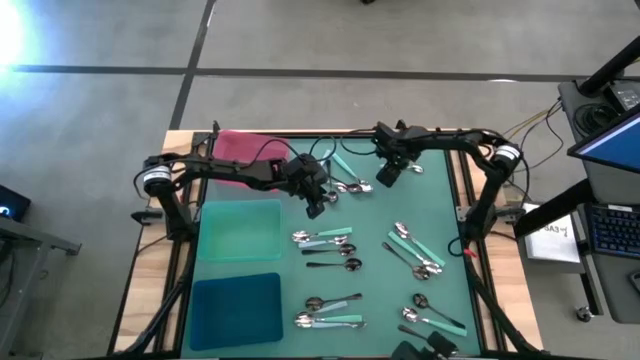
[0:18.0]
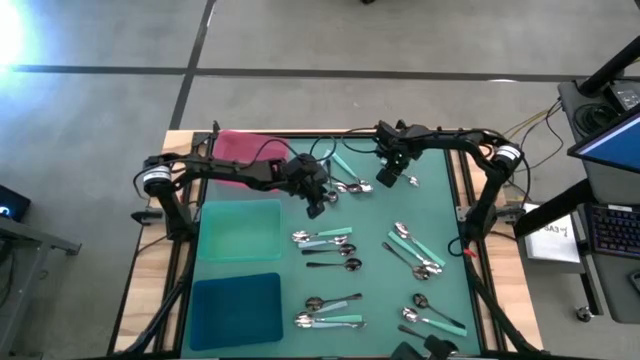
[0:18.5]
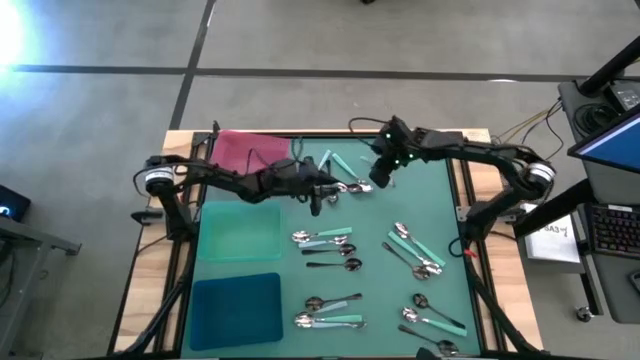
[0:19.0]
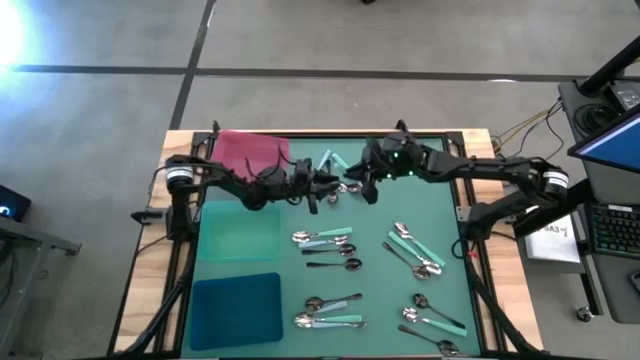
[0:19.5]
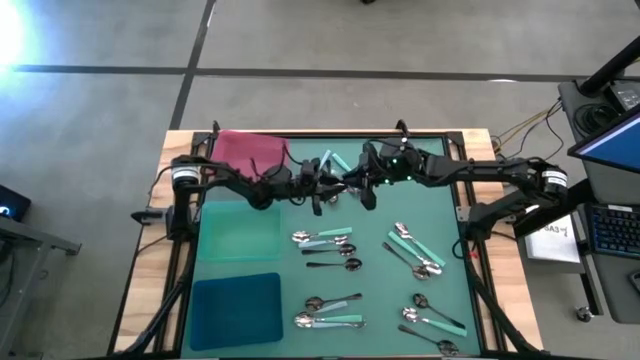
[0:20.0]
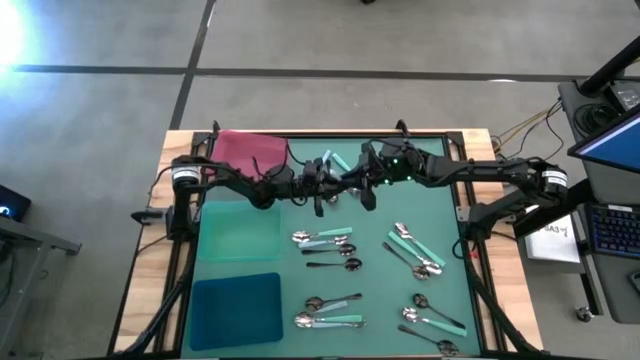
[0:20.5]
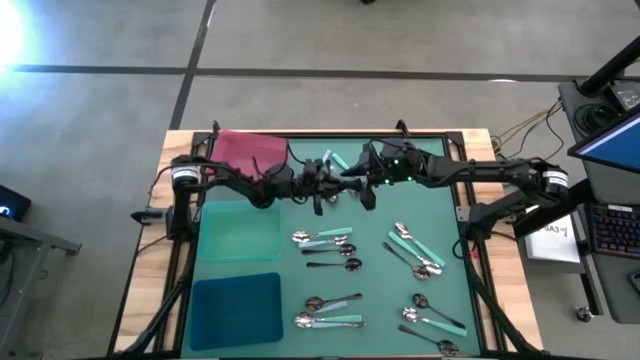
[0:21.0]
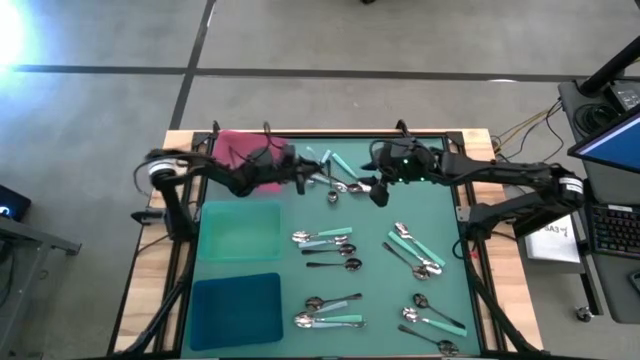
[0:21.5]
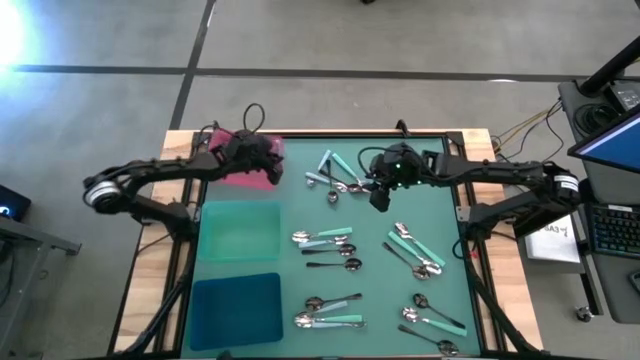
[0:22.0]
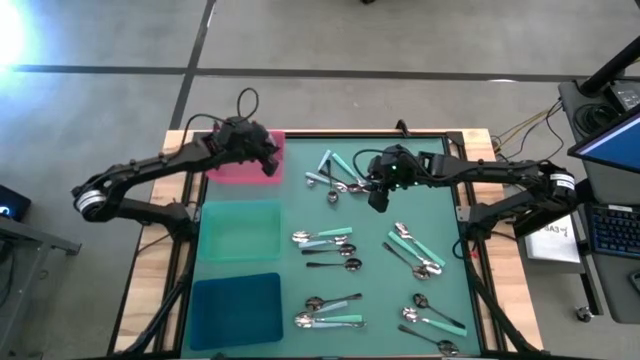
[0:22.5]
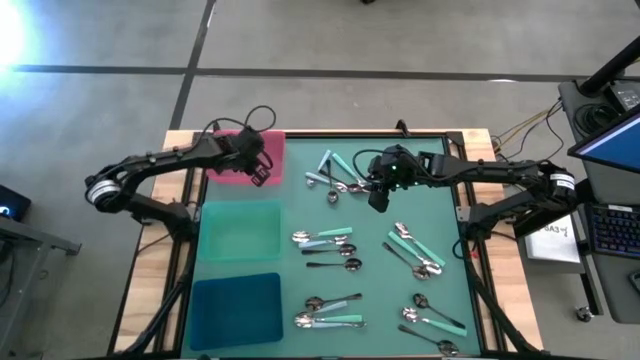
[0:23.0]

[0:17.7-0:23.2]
Task: Sort silverware by color (type)
Put the blue spoon into the pink bin

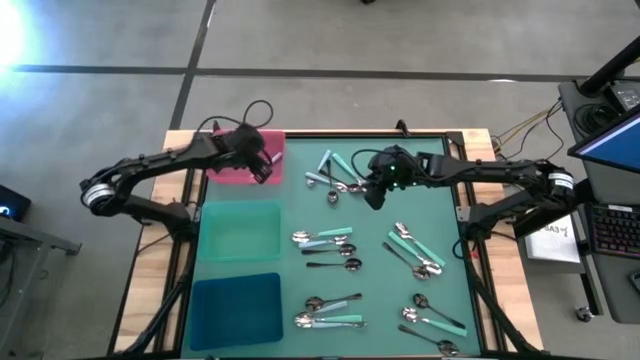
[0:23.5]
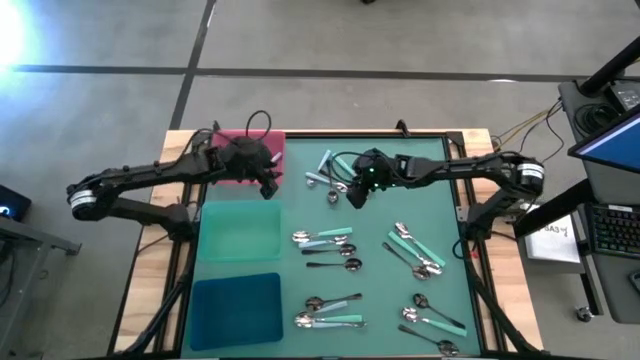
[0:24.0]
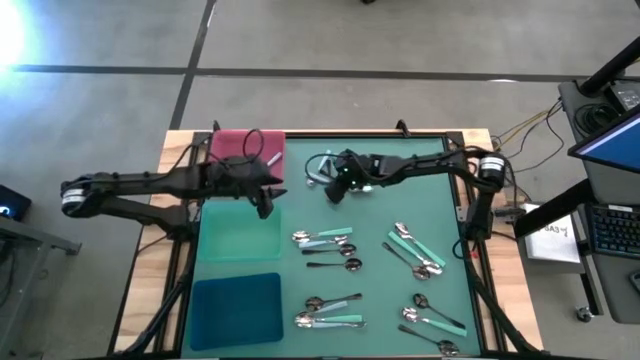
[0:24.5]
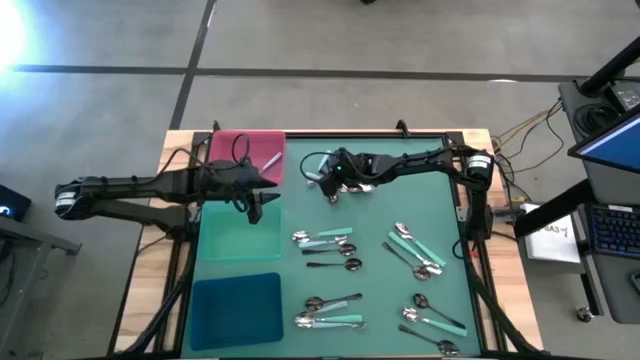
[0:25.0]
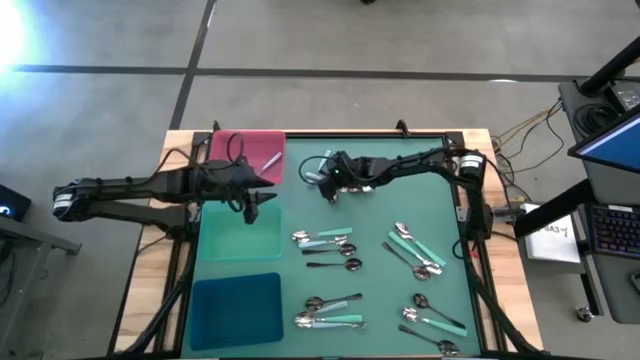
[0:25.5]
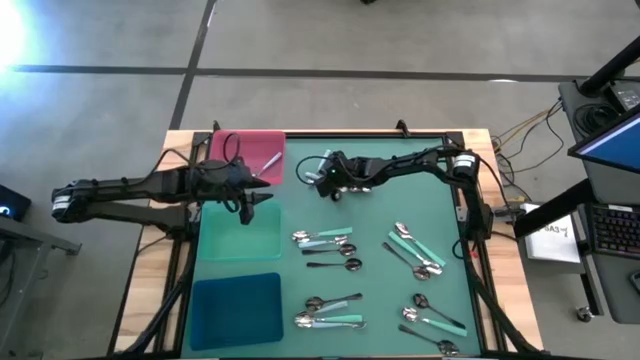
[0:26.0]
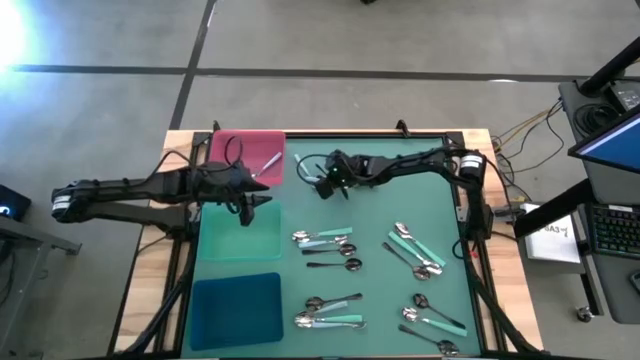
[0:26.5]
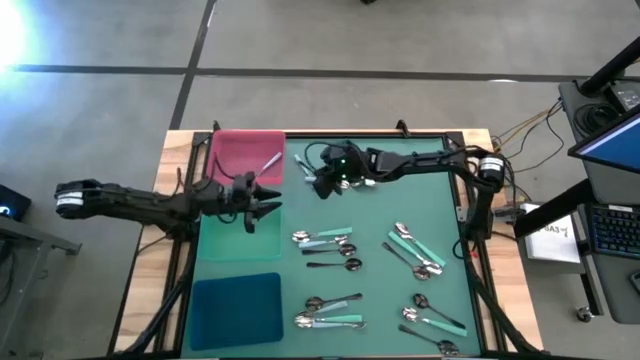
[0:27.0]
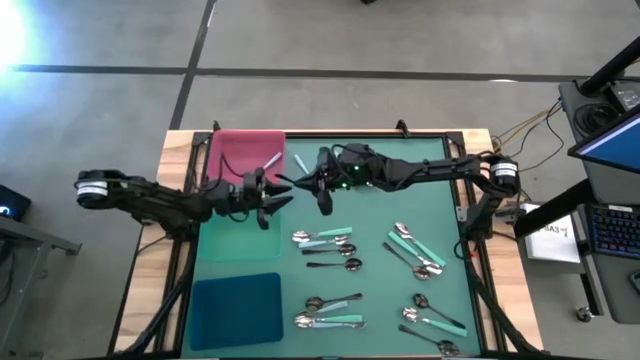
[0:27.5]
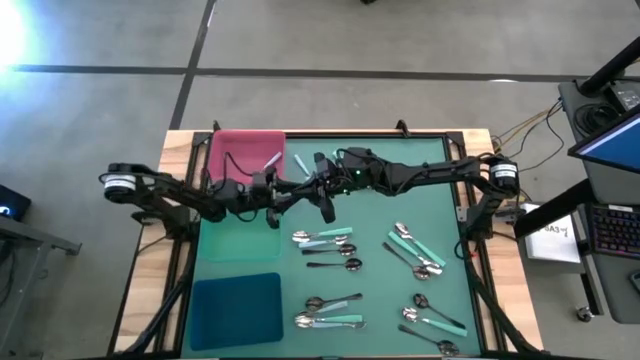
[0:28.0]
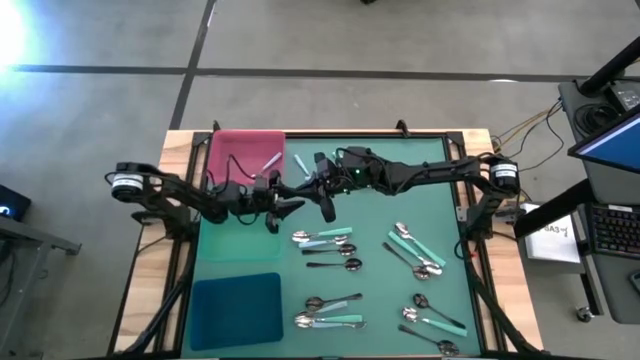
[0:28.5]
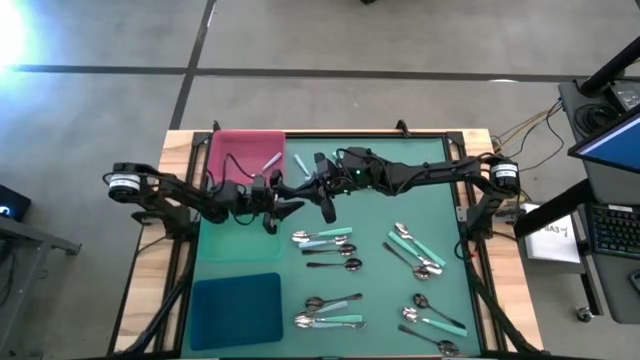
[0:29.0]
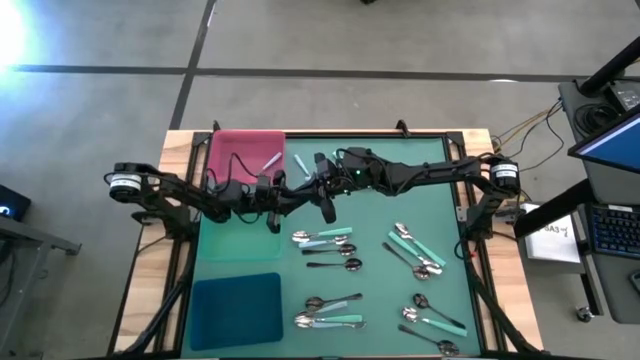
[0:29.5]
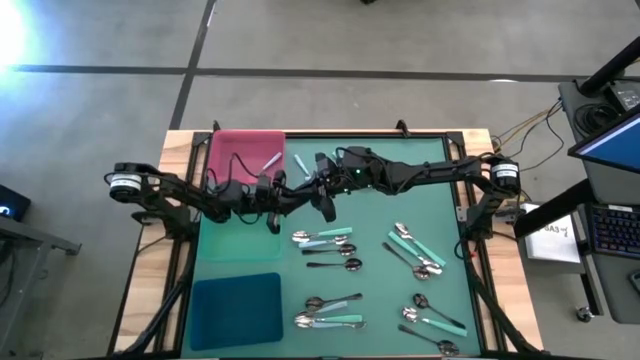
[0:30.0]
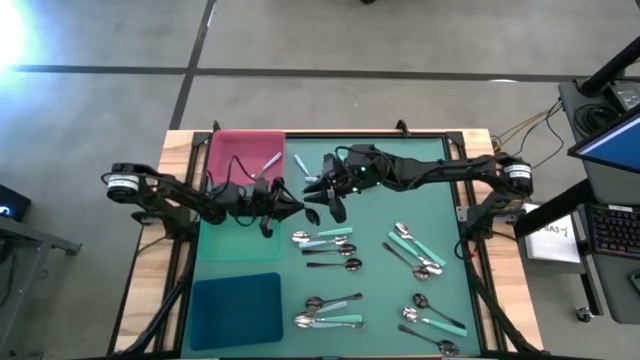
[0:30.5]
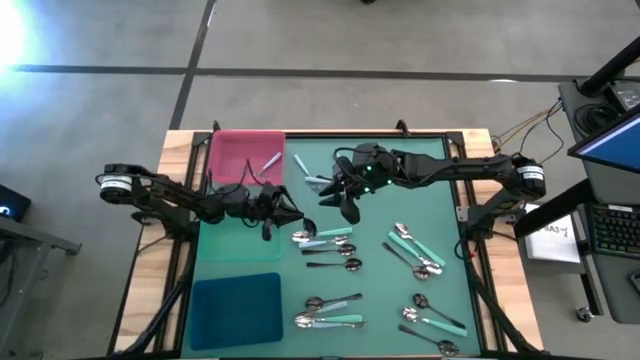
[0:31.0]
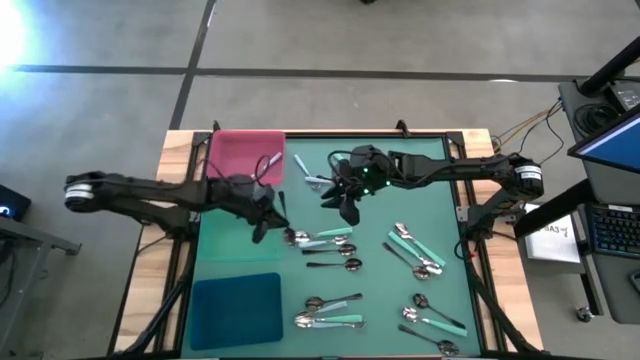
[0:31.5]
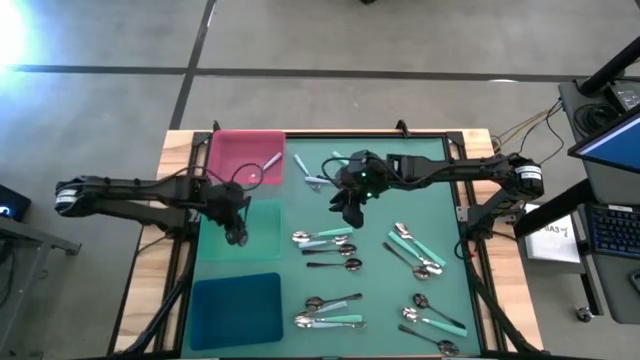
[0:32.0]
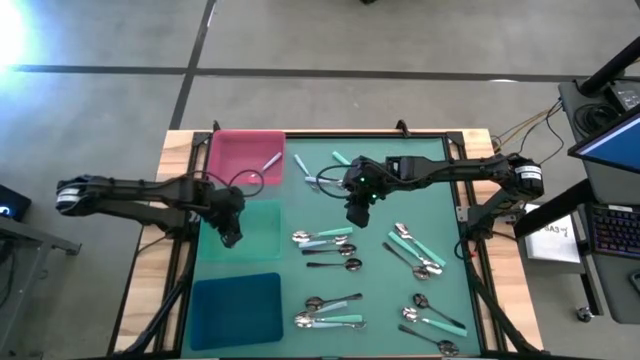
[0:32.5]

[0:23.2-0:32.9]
Put the black spoon into the green bin

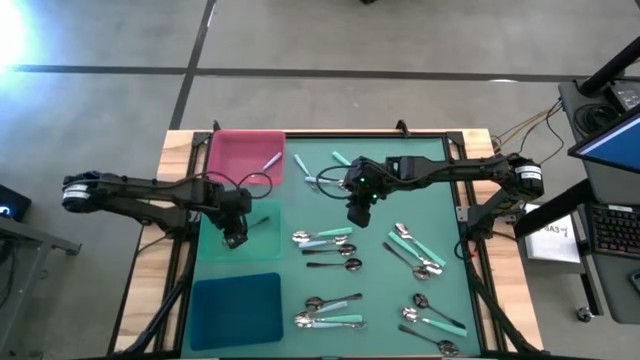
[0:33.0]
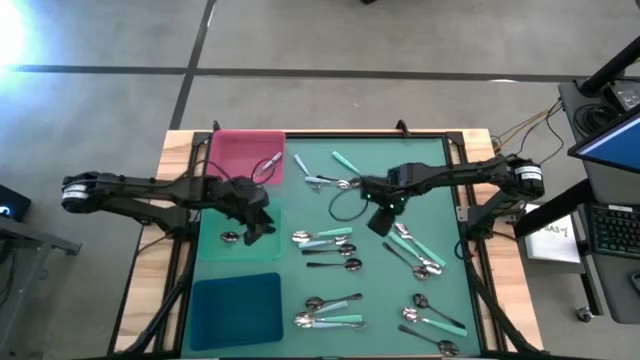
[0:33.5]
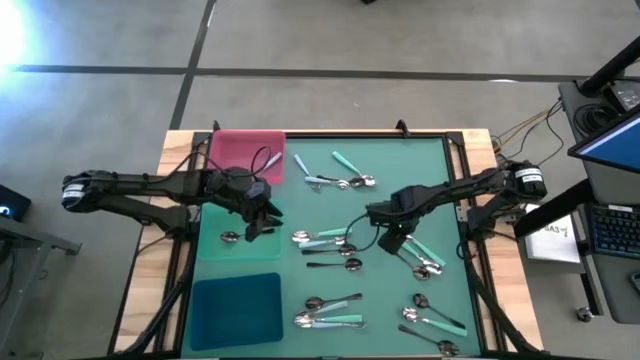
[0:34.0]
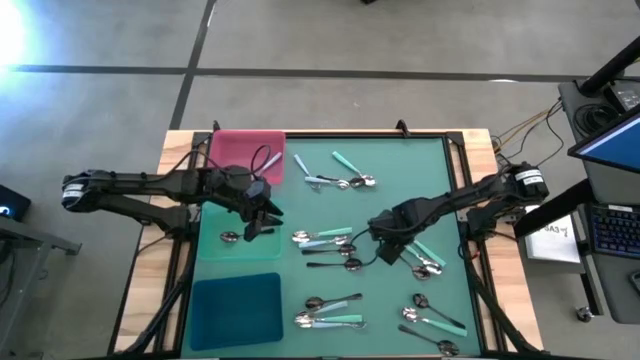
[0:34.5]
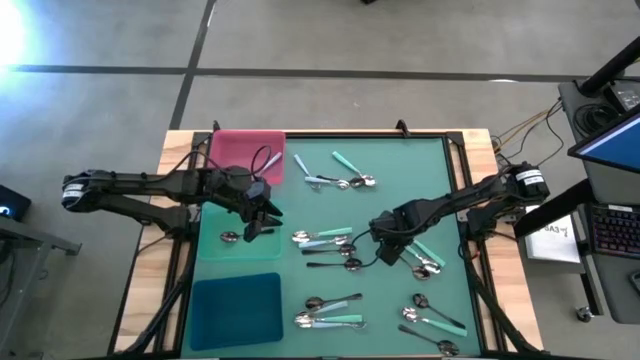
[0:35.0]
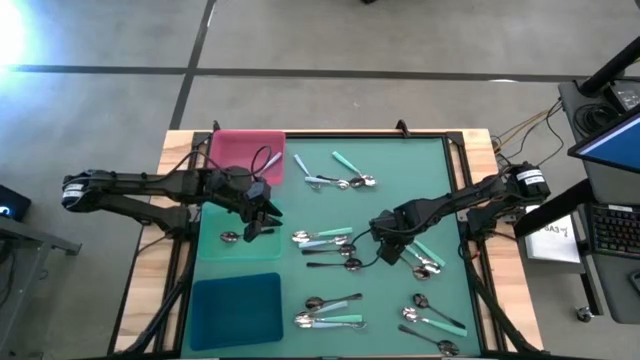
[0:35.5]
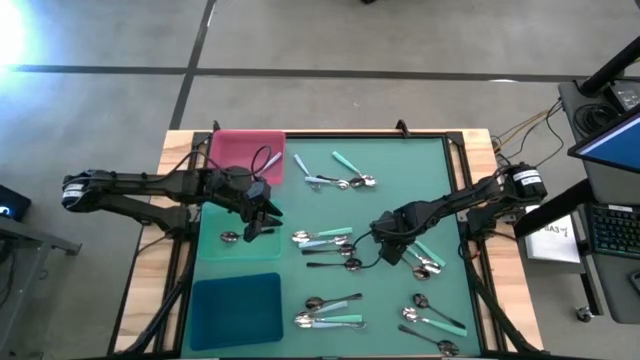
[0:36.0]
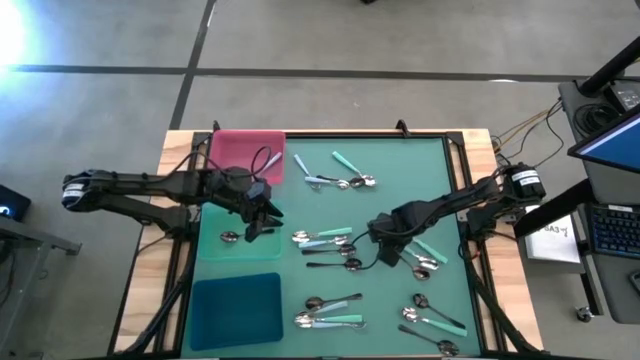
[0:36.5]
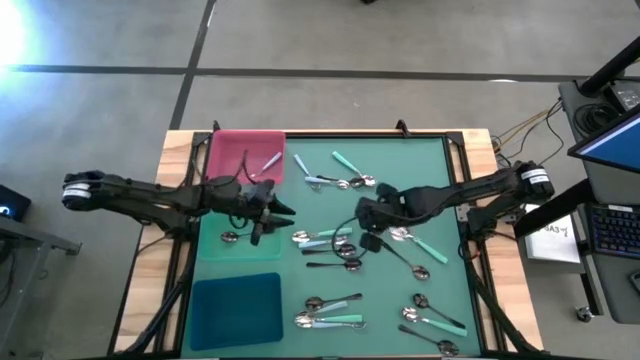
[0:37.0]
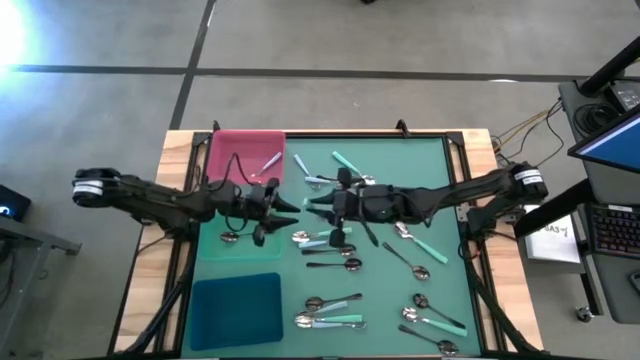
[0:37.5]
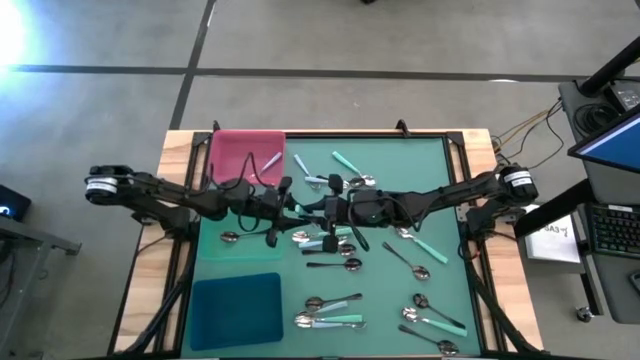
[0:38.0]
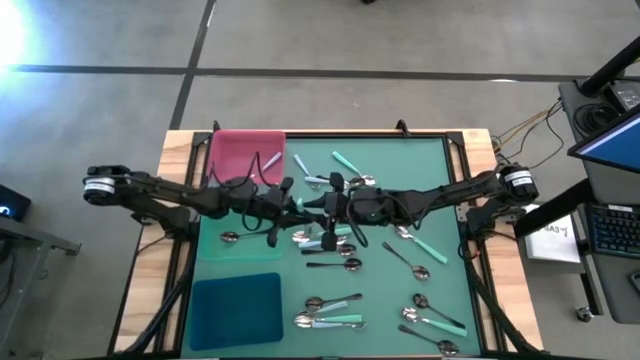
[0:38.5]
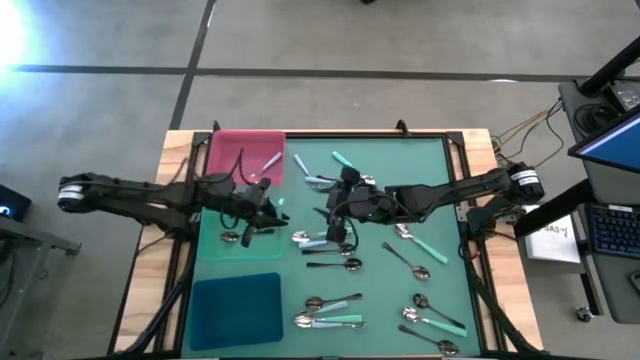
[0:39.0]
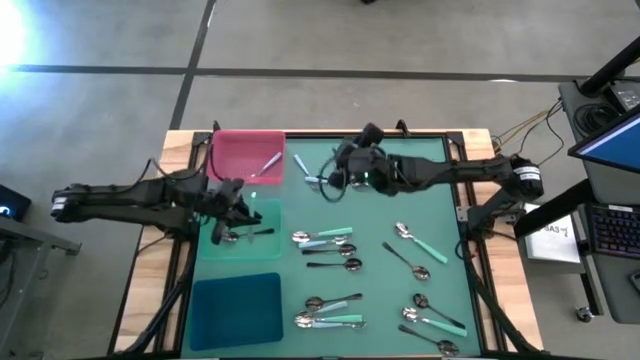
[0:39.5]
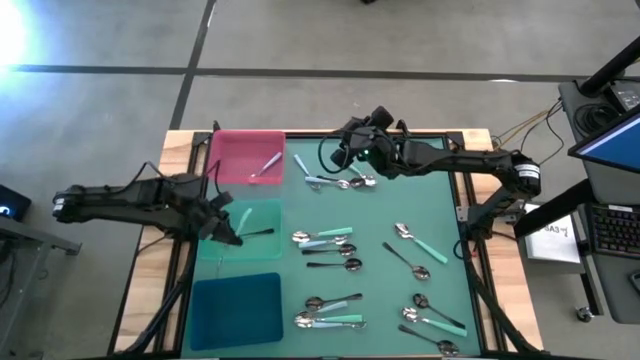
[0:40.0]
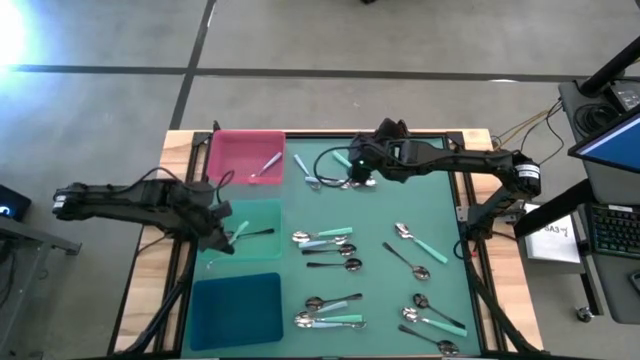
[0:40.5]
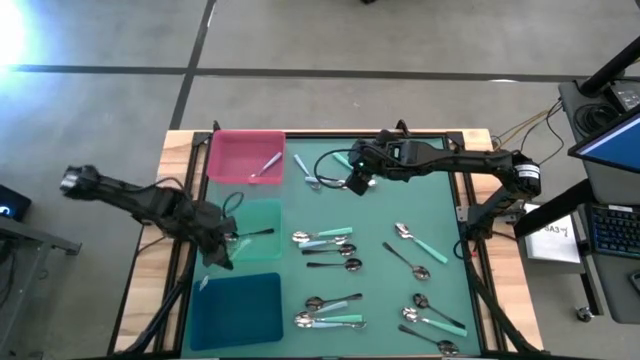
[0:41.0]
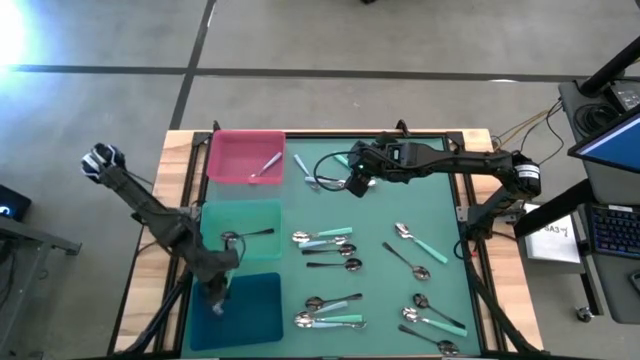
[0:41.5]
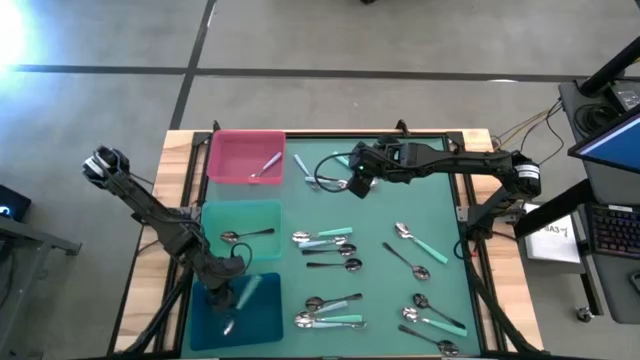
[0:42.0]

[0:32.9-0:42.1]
Put the light blue spoon into the blue bin
